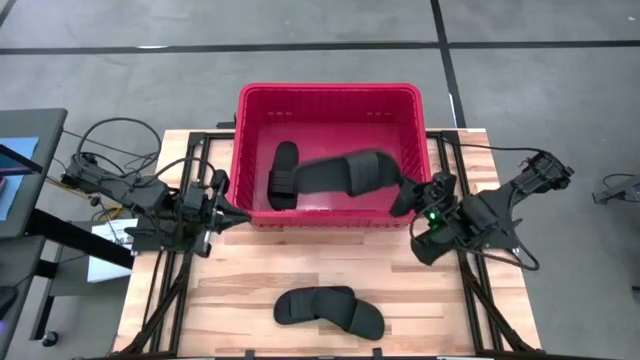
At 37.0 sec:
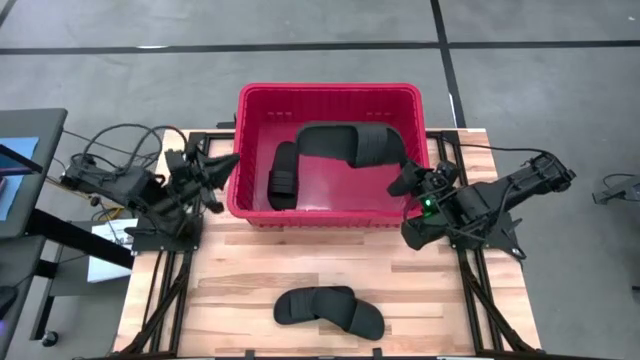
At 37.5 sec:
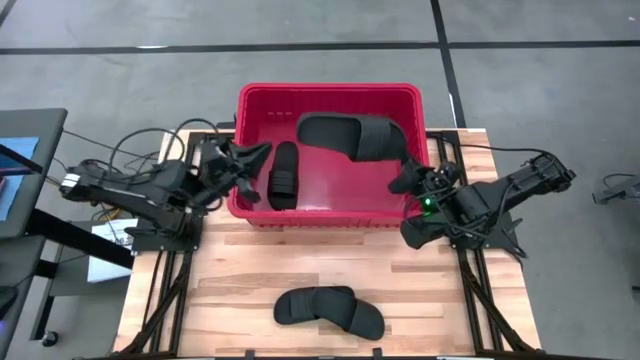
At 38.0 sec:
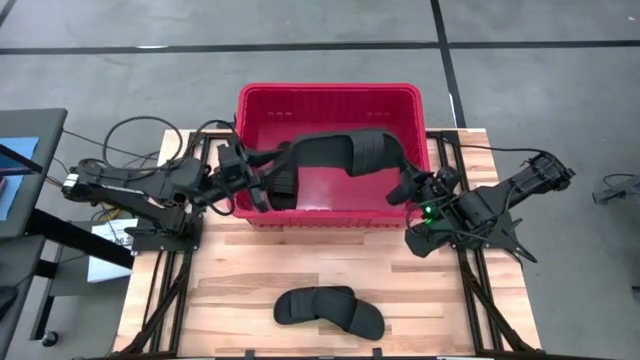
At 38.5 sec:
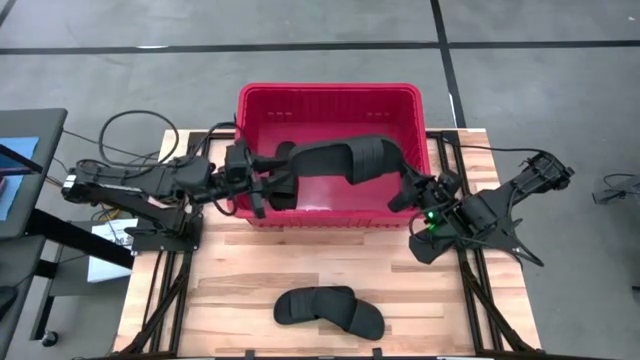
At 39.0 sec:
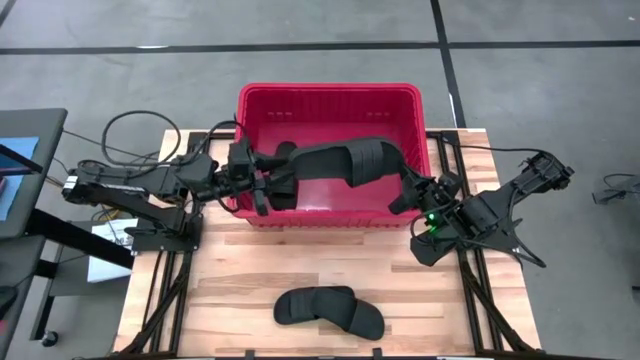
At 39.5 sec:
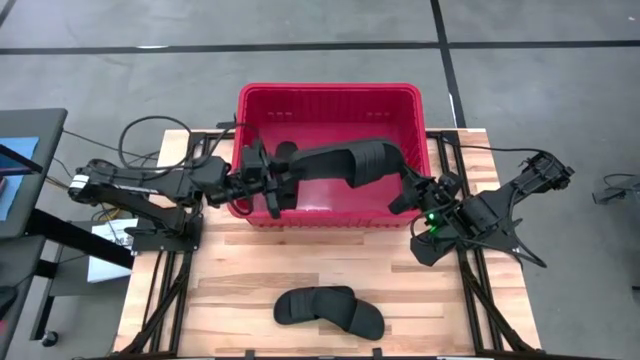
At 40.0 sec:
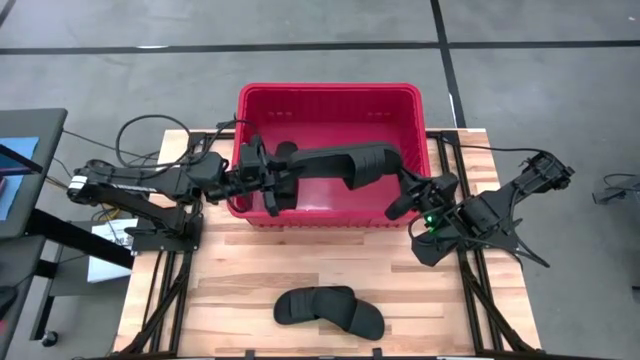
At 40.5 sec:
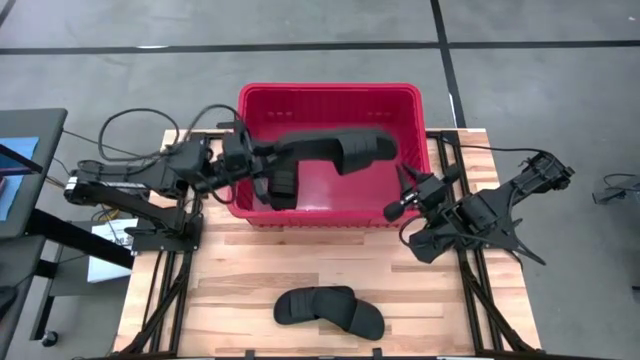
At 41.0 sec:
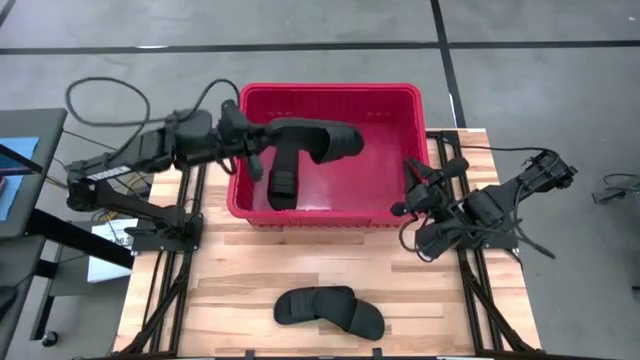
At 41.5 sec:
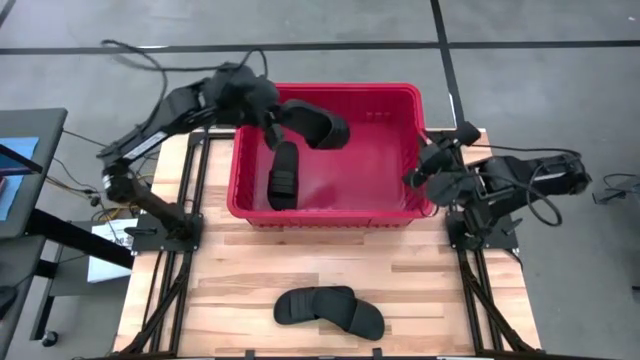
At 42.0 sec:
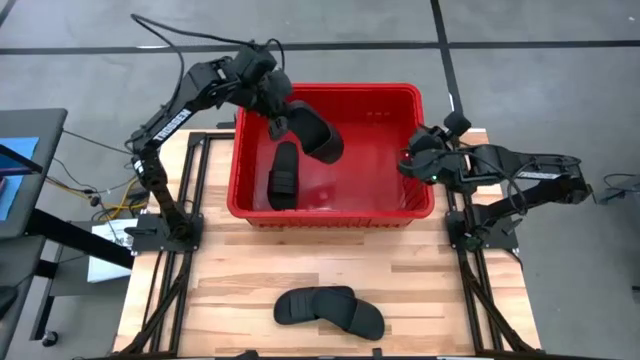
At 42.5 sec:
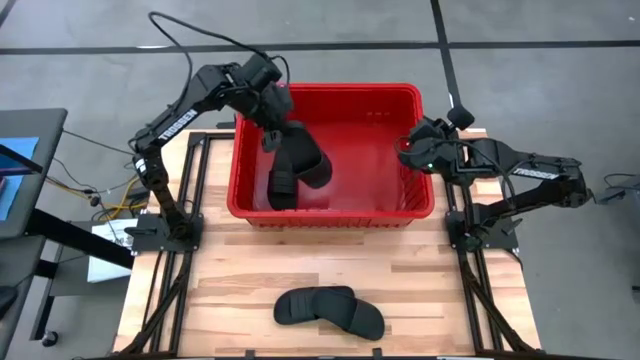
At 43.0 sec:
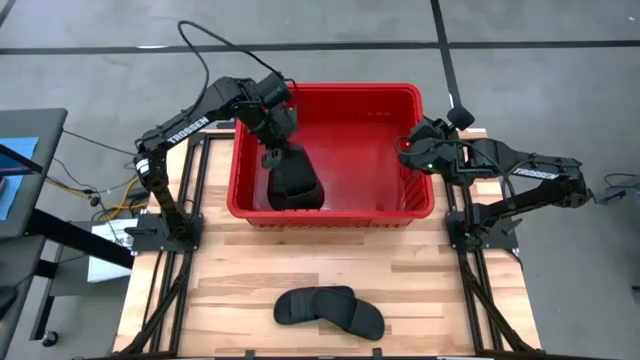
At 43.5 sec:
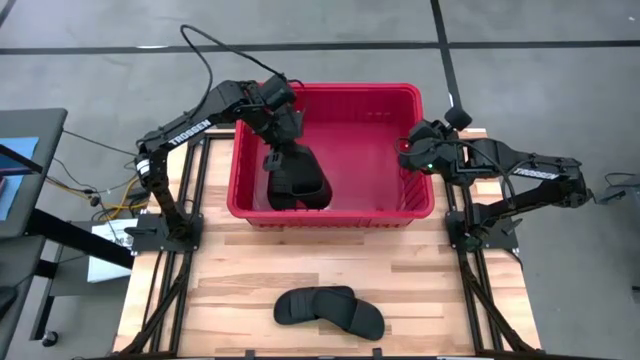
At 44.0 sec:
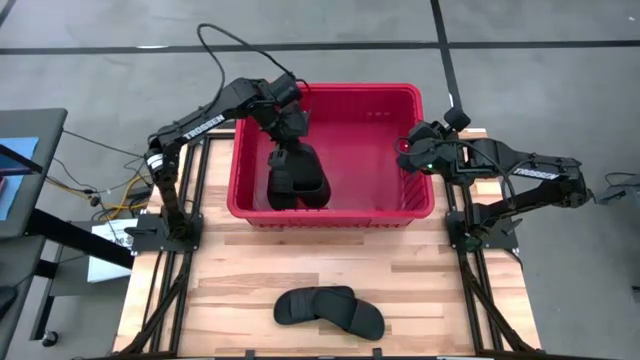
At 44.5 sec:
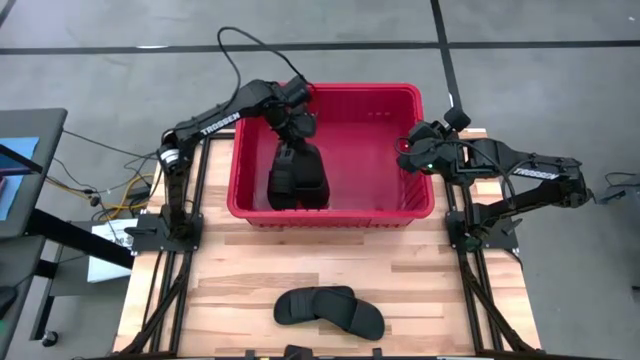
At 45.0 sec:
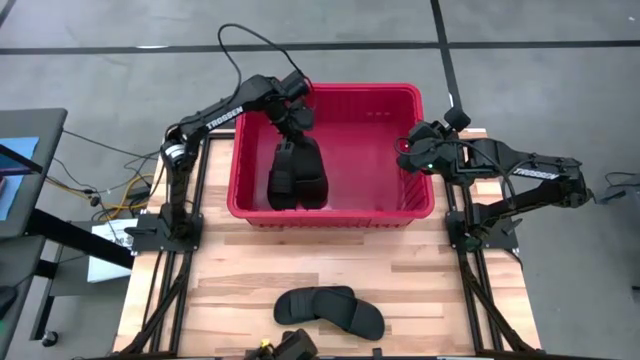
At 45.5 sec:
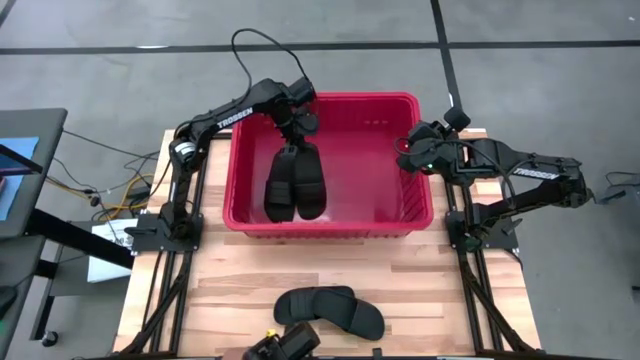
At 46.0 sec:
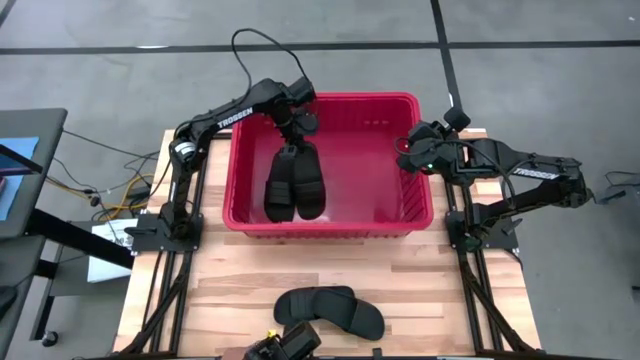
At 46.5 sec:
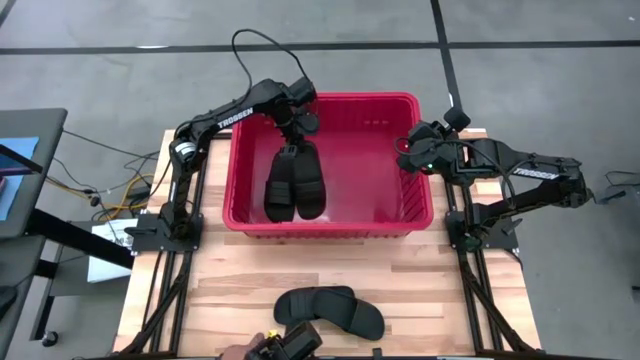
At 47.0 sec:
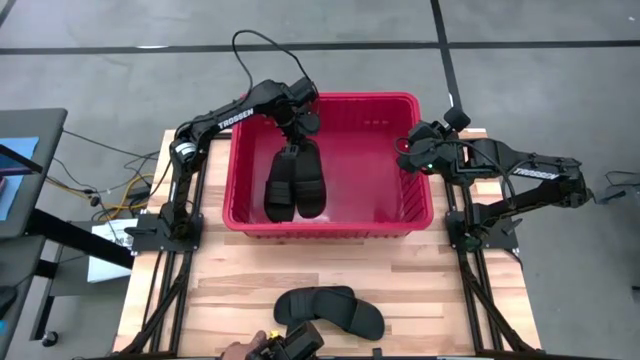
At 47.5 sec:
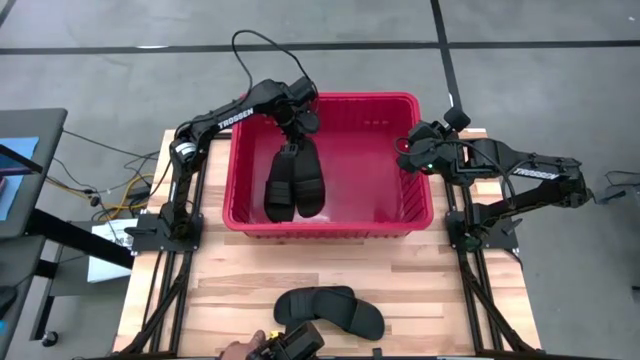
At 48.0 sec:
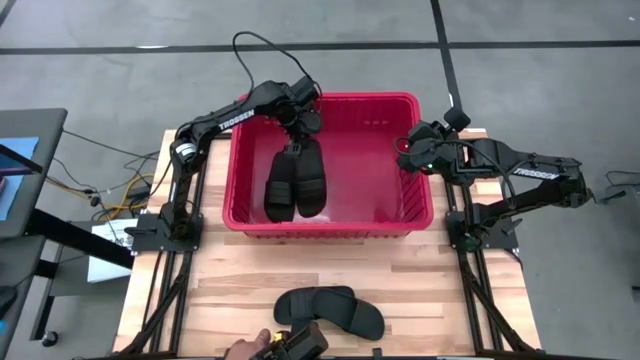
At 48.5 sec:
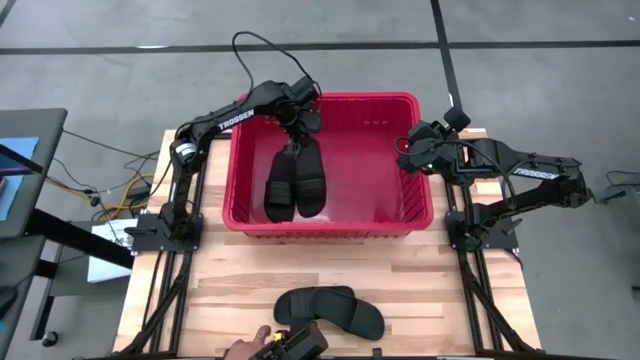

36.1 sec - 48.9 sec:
Task: Pick and place slides into bin
Put the top slide into the organizer bin

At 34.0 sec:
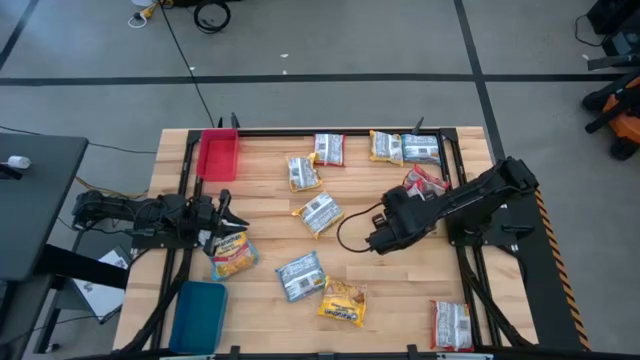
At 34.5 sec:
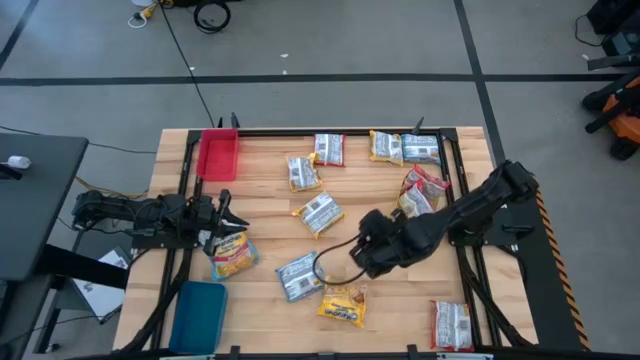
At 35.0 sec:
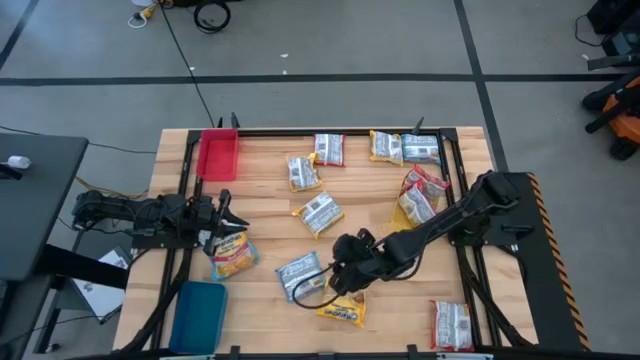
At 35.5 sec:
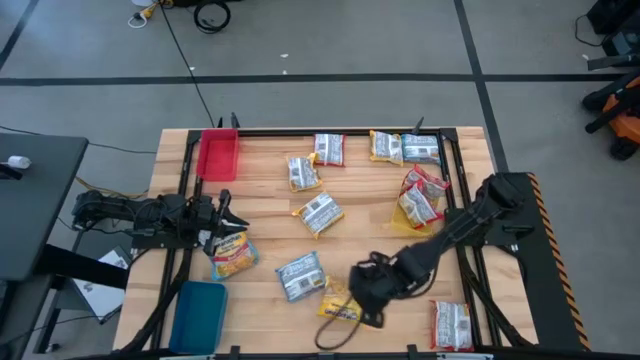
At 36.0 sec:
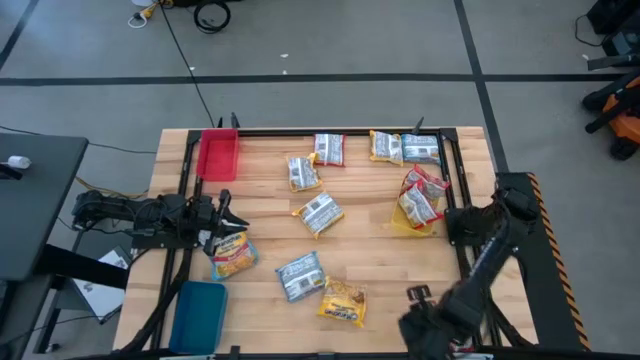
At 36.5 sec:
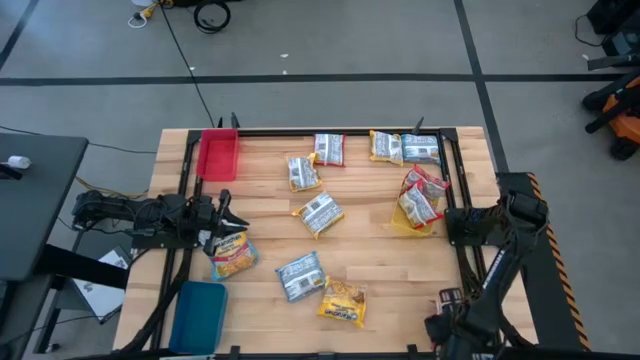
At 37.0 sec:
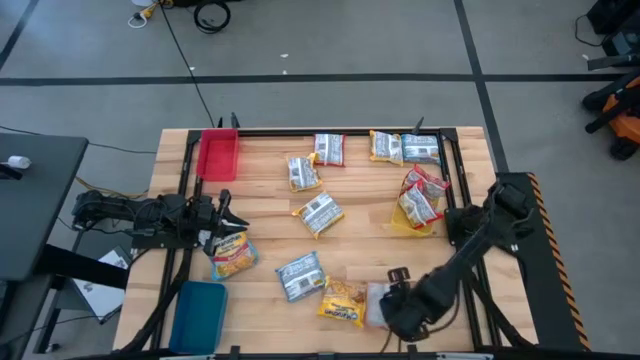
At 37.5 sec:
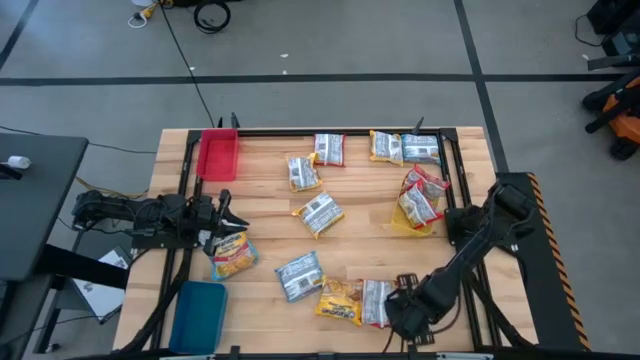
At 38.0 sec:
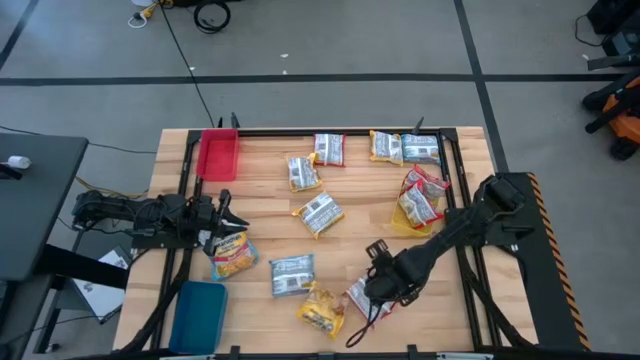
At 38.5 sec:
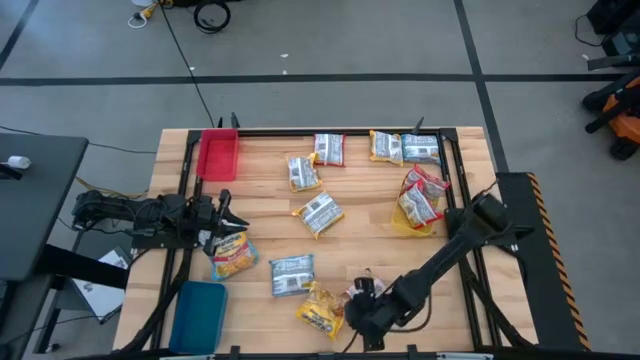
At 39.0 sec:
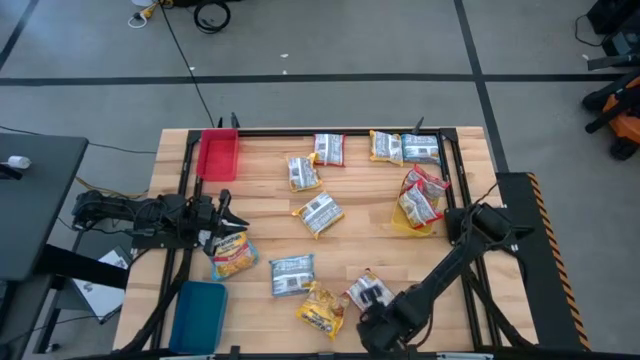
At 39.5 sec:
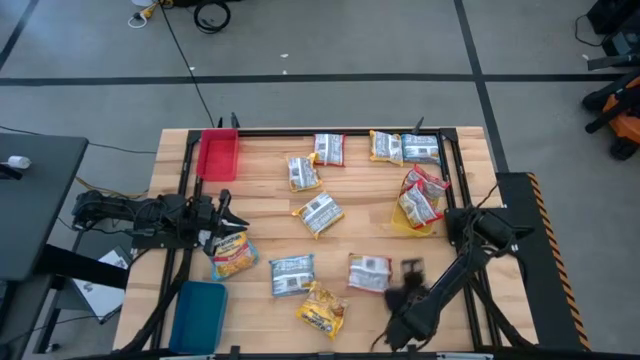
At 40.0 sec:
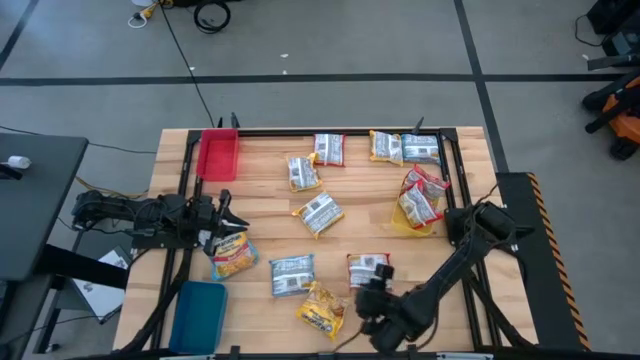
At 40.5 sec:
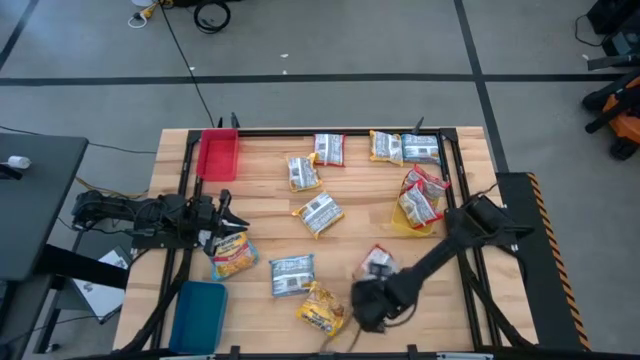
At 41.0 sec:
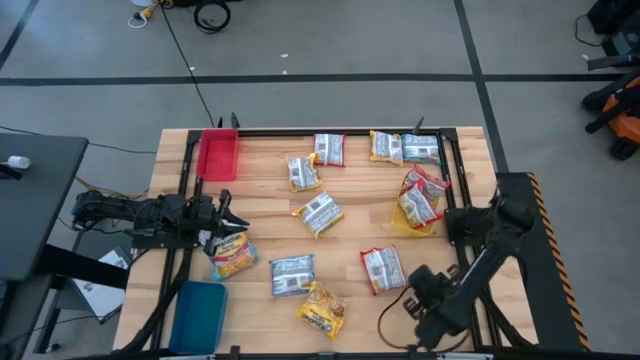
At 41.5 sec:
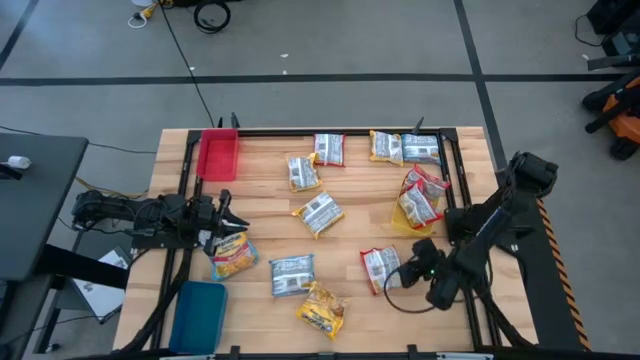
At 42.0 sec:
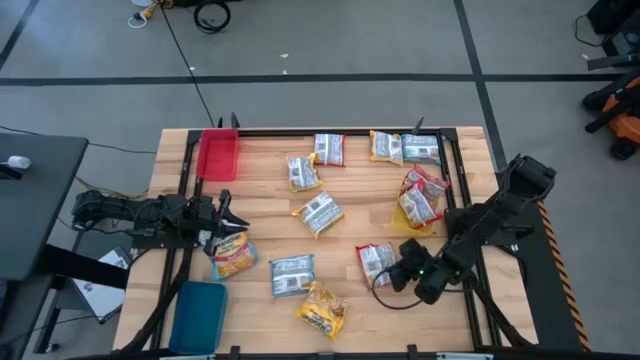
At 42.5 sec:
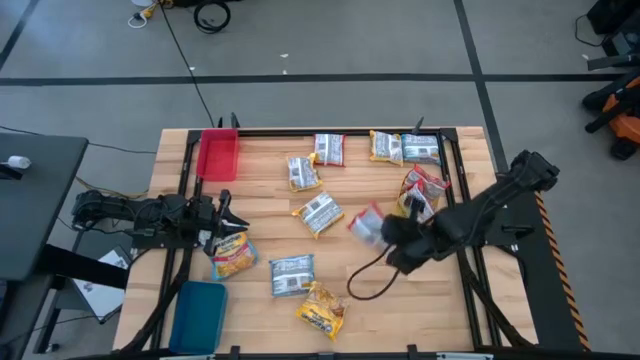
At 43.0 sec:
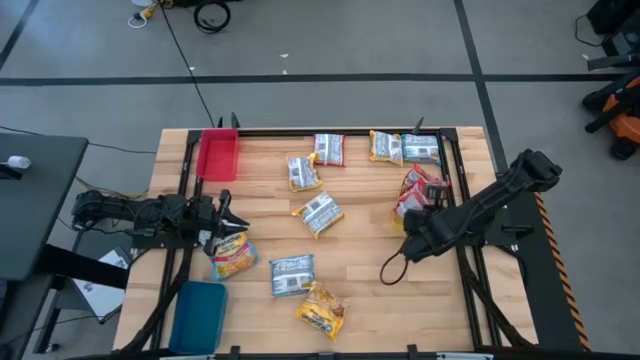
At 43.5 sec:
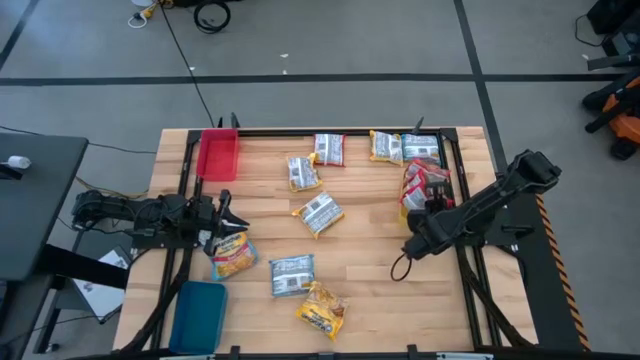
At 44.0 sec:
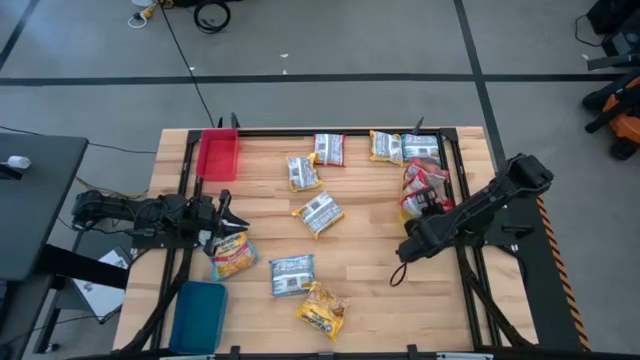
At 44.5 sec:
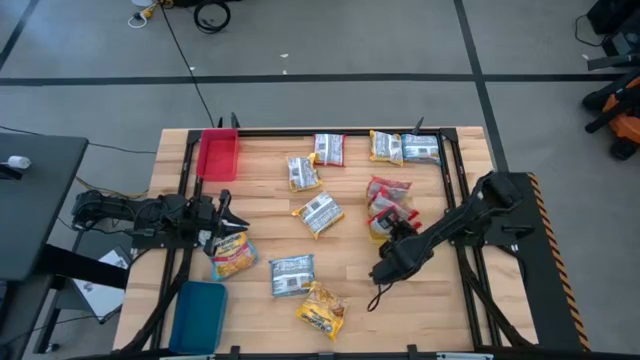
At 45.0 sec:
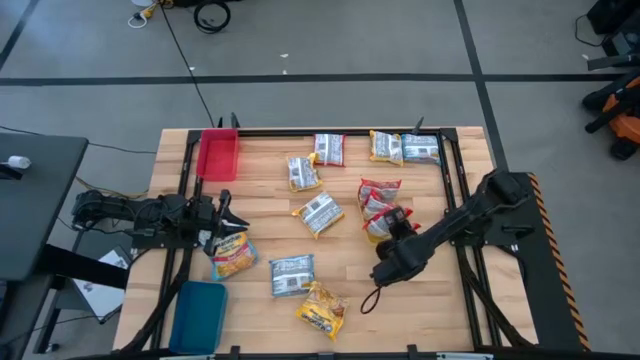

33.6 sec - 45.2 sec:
Task: Sort Maruchan noodles
Put the red noodle pack into the yellow bin
